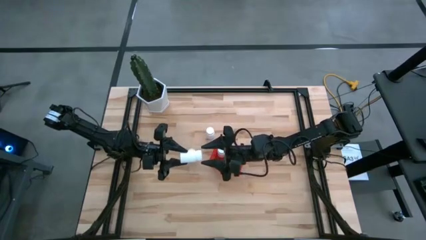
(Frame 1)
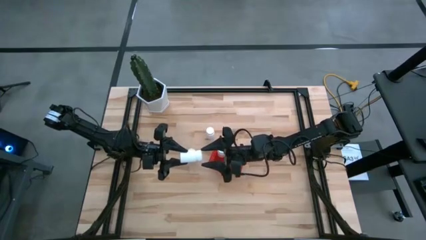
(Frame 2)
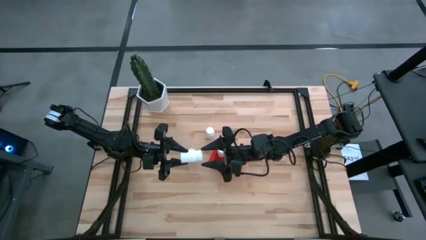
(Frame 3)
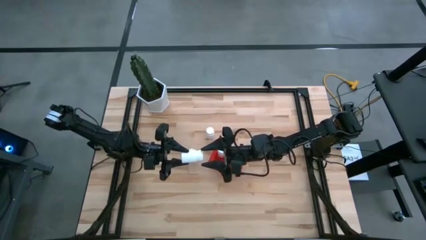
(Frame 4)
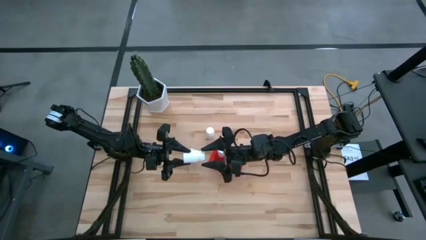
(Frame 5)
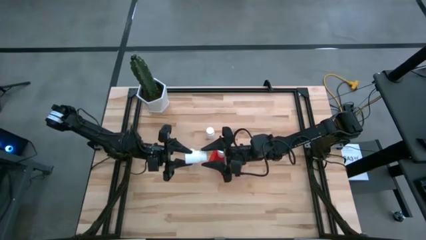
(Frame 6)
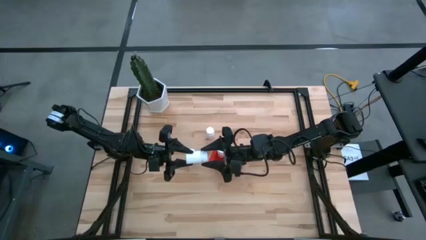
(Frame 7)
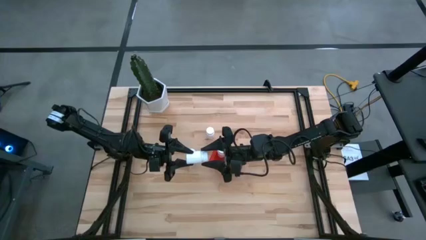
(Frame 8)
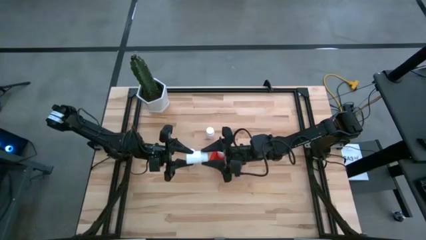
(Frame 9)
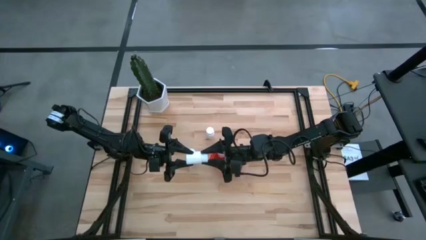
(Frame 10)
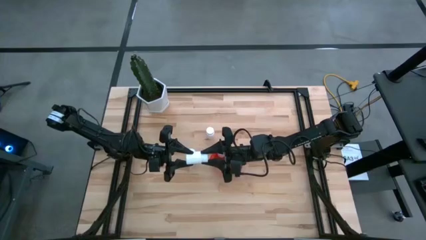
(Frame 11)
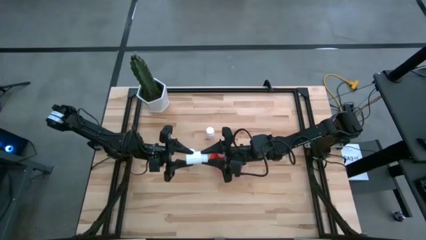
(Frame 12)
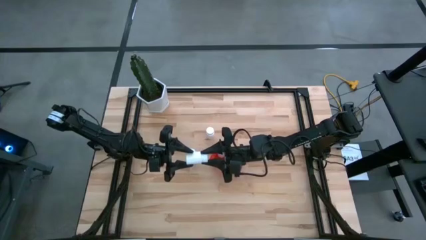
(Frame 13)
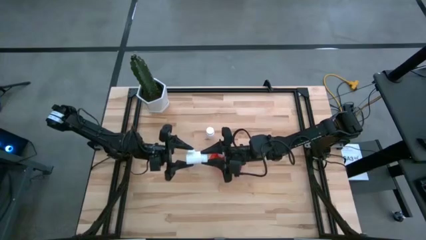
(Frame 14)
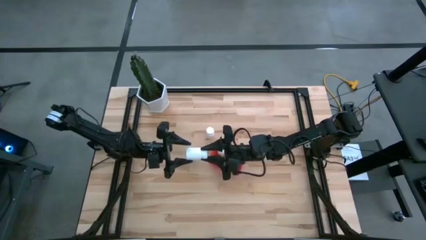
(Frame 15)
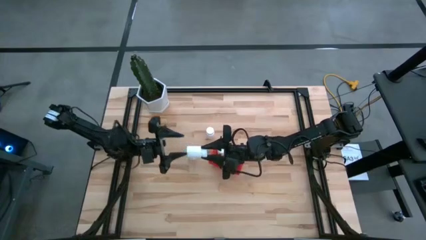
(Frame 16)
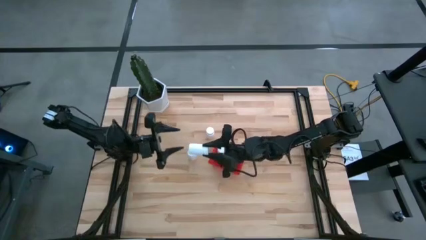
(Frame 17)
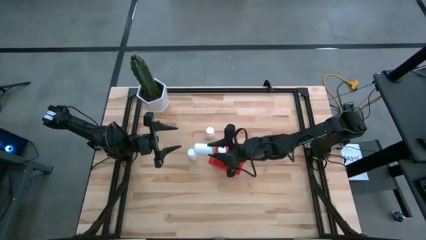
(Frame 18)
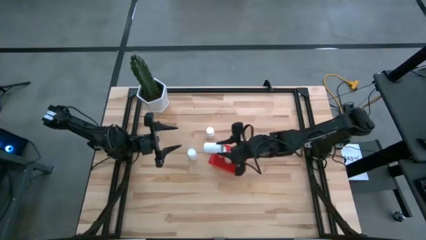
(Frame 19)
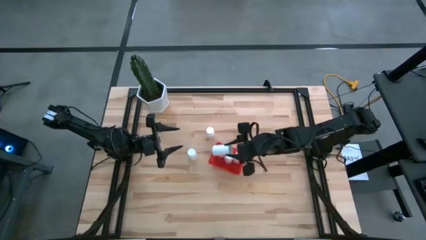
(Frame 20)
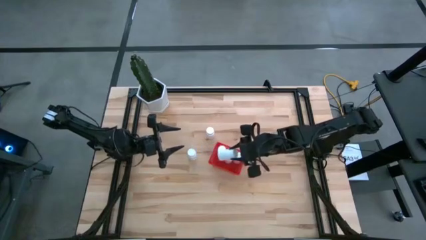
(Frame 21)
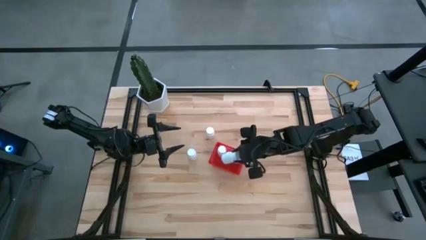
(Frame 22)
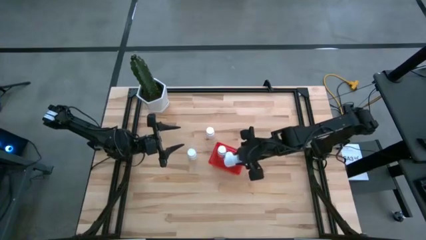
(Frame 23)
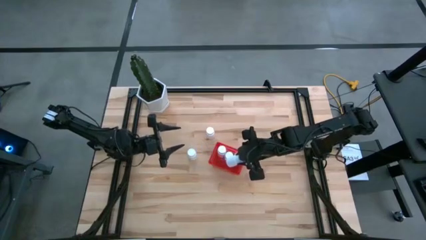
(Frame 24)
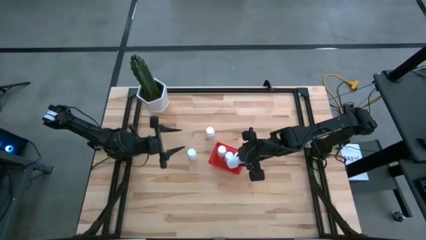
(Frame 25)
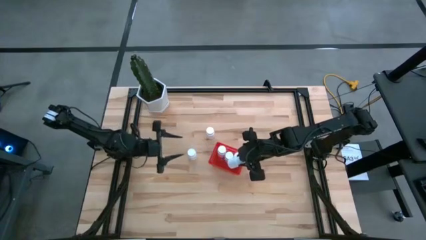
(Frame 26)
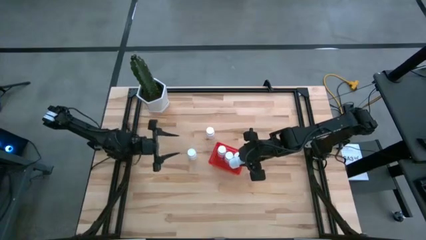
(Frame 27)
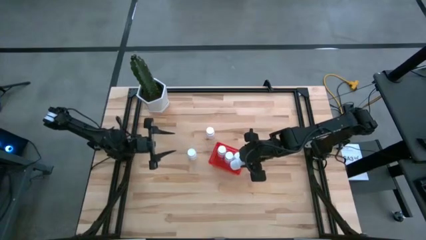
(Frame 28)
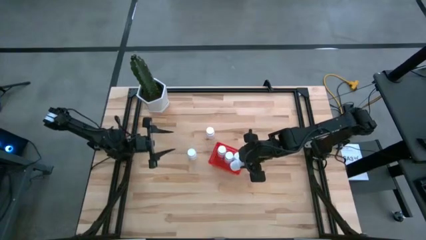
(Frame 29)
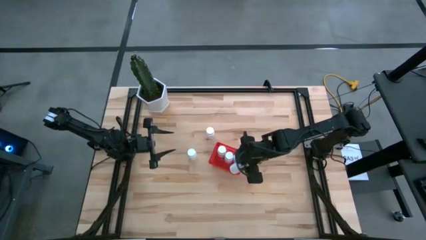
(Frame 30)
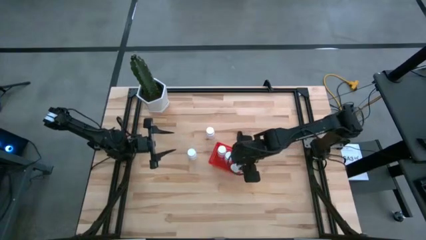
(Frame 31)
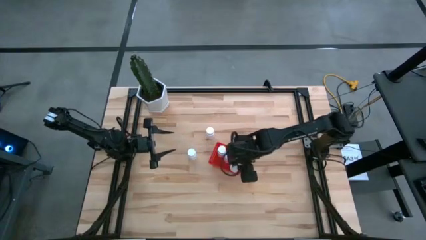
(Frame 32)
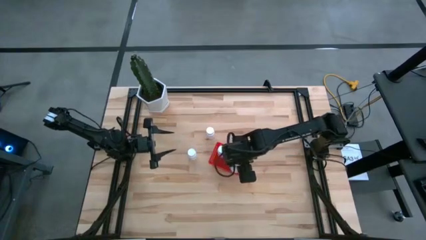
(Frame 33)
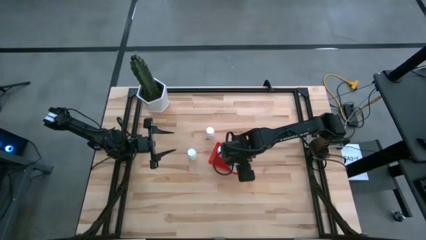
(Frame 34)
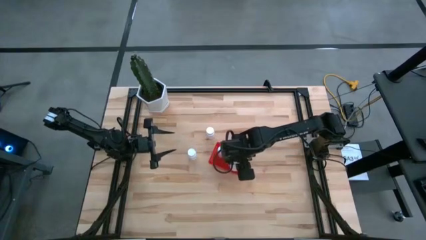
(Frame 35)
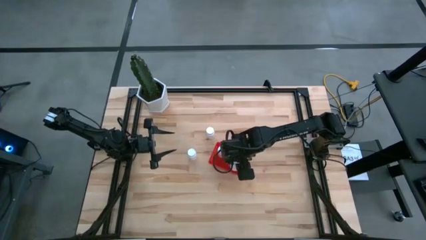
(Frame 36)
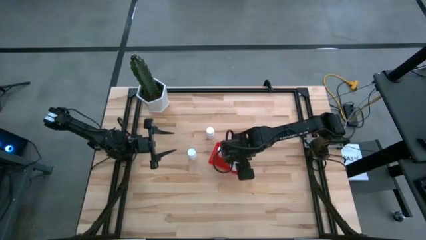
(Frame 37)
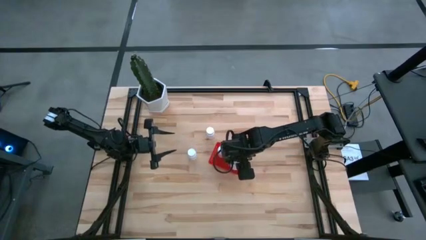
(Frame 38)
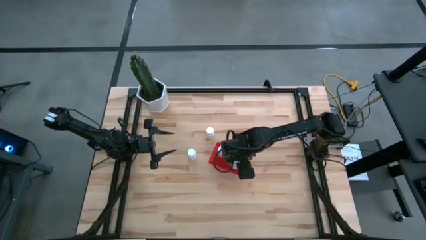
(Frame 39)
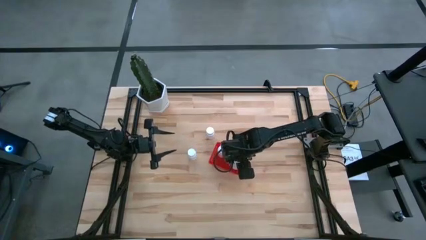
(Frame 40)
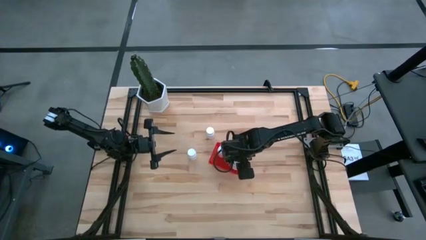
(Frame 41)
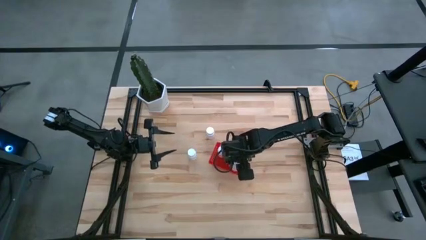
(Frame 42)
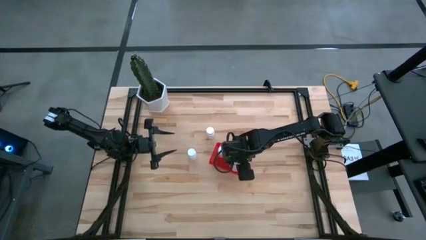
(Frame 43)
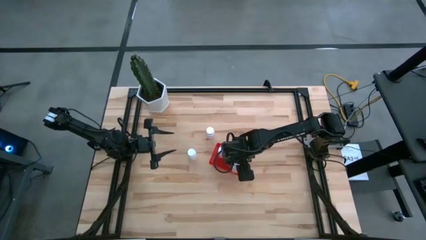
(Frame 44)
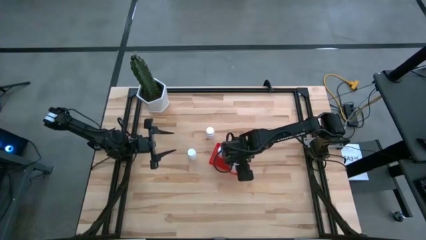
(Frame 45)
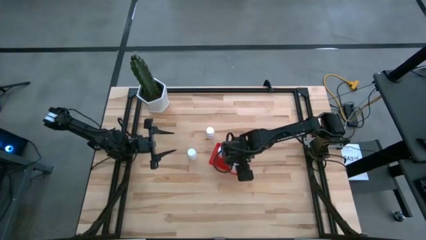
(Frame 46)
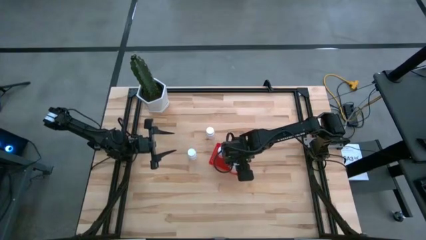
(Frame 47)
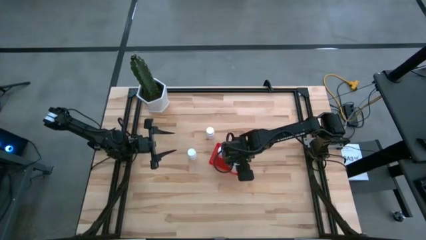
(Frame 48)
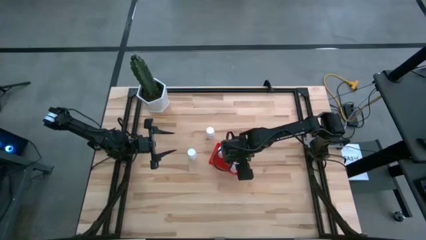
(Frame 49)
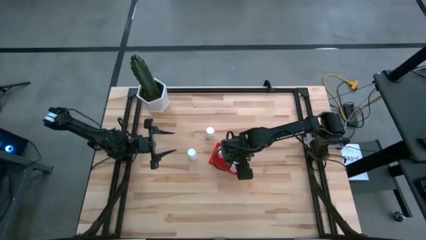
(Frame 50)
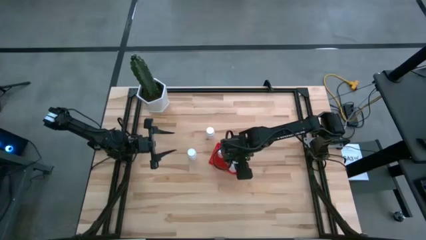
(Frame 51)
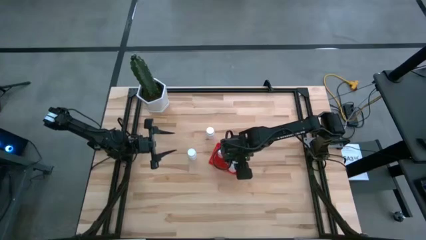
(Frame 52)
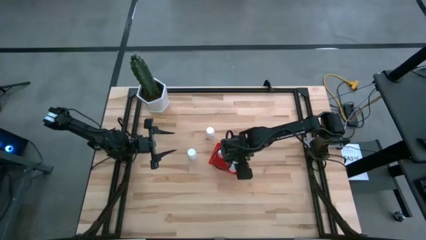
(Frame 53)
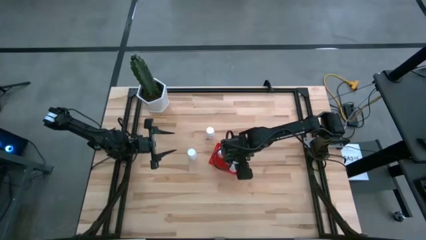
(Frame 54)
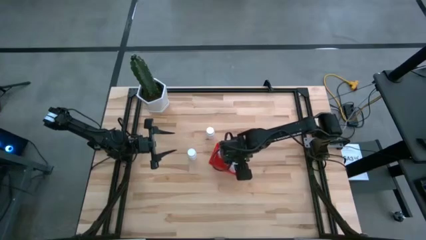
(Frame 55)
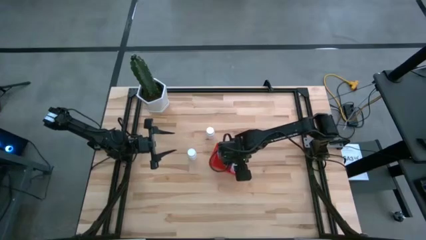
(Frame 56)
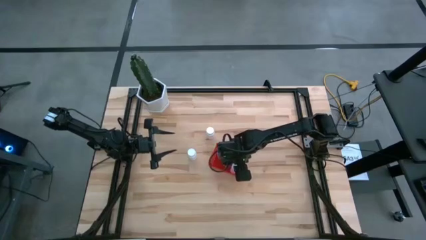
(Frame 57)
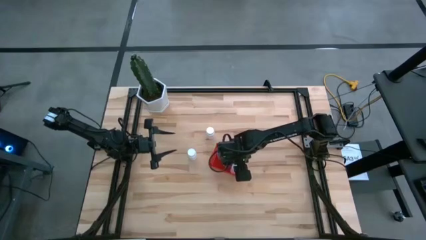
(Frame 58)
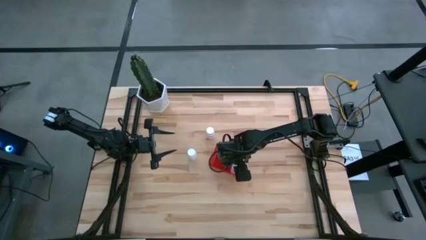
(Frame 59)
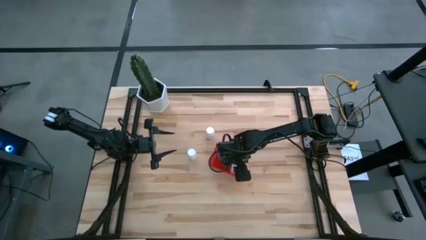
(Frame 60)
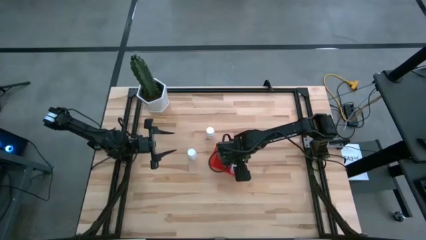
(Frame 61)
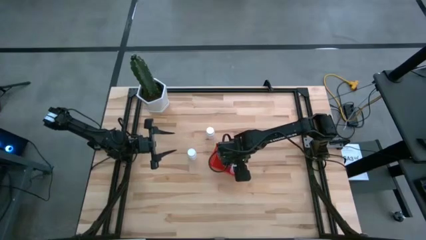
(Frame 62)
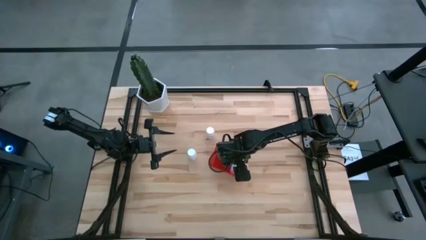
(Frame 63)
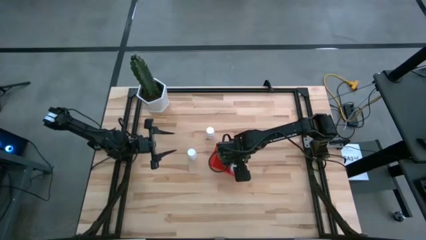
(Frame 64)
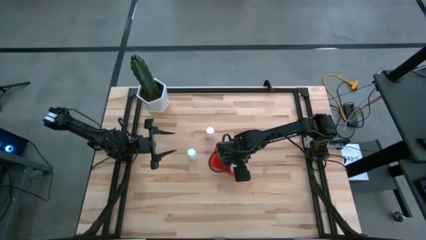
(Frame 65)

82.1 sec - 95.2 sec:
Task: Pick and place pill bottles into a basket
Put the white pill bottle into the red bin
